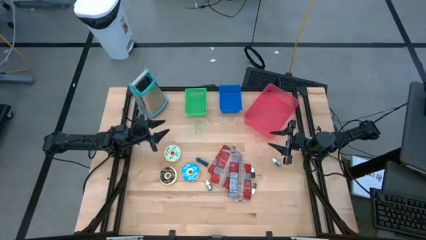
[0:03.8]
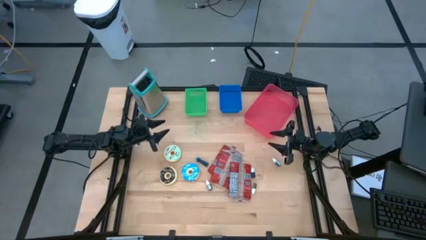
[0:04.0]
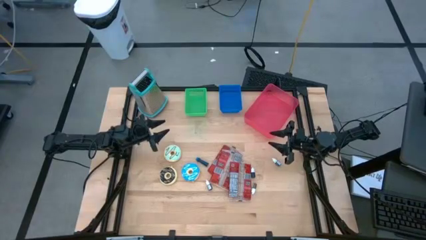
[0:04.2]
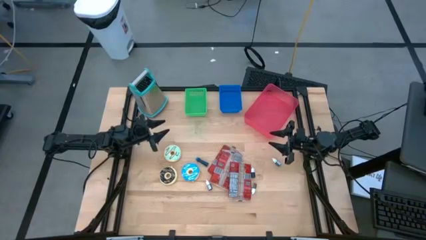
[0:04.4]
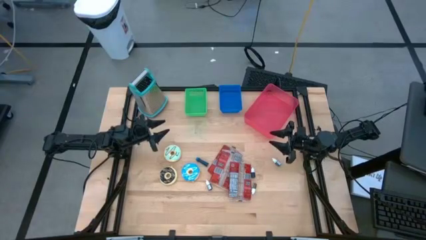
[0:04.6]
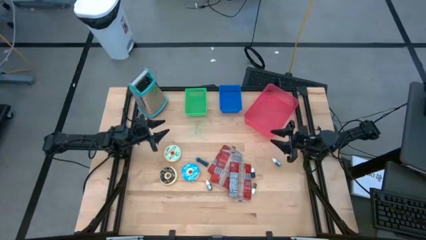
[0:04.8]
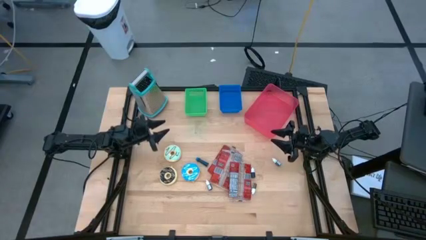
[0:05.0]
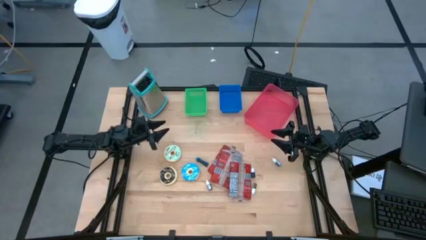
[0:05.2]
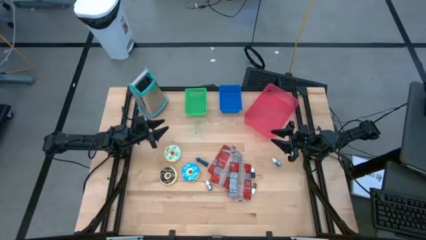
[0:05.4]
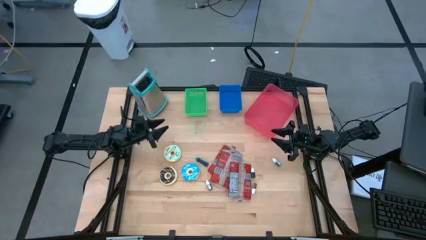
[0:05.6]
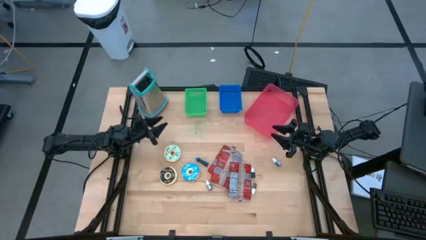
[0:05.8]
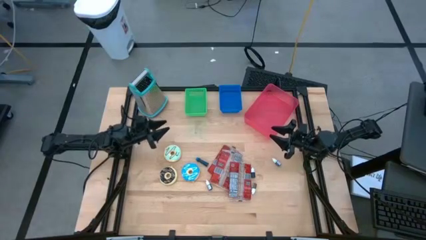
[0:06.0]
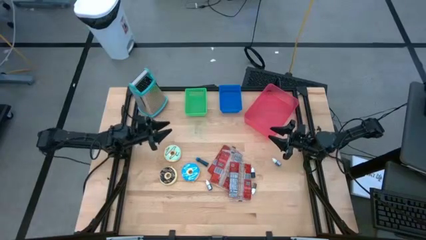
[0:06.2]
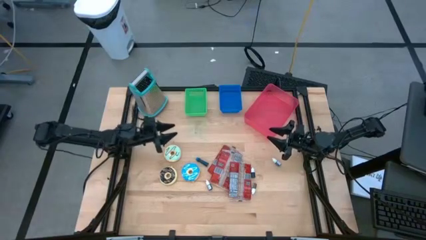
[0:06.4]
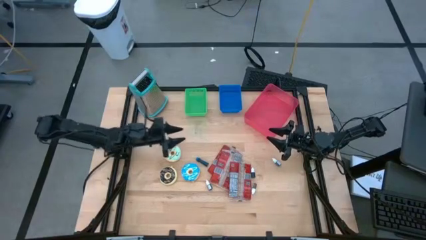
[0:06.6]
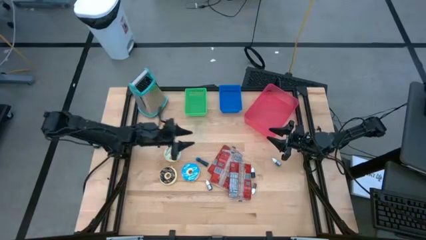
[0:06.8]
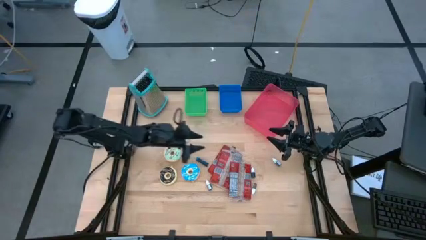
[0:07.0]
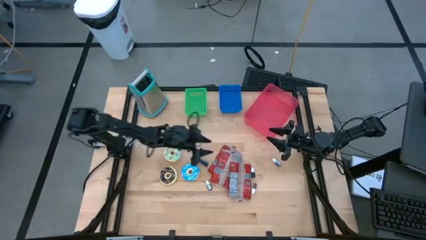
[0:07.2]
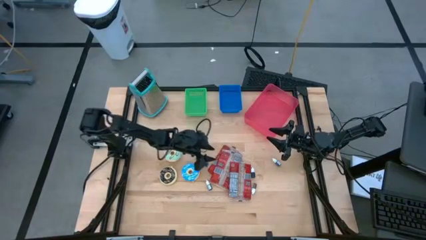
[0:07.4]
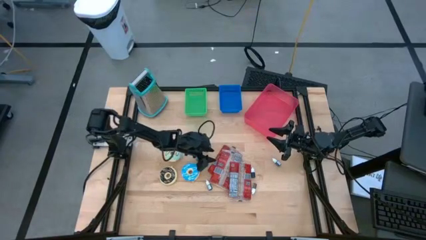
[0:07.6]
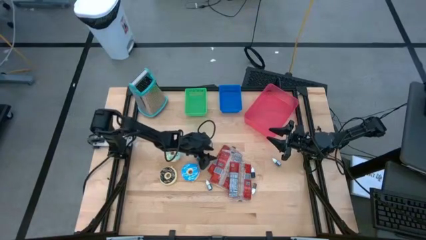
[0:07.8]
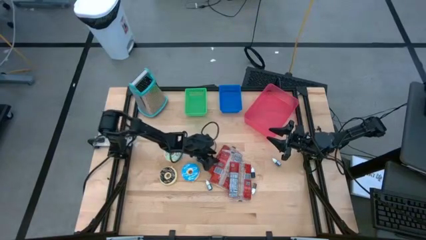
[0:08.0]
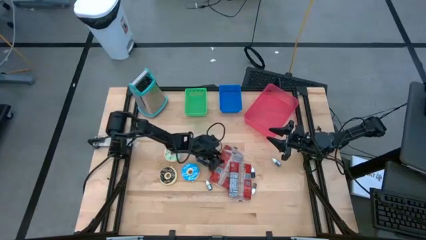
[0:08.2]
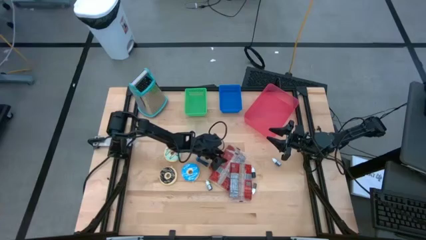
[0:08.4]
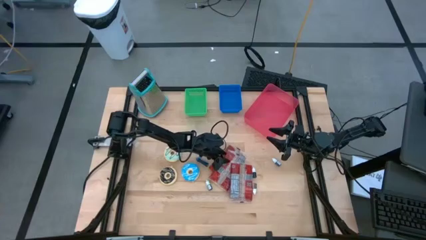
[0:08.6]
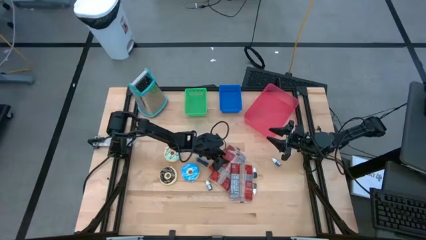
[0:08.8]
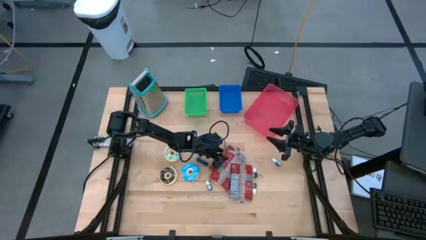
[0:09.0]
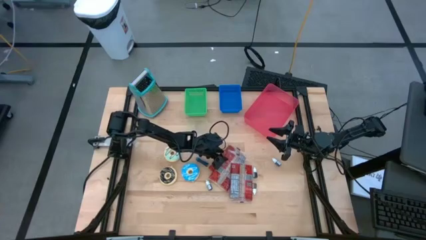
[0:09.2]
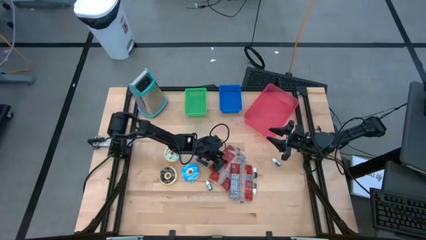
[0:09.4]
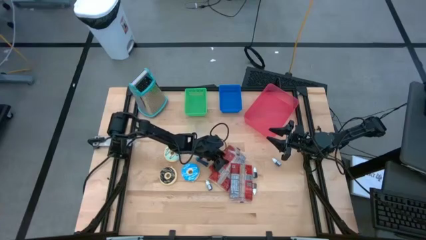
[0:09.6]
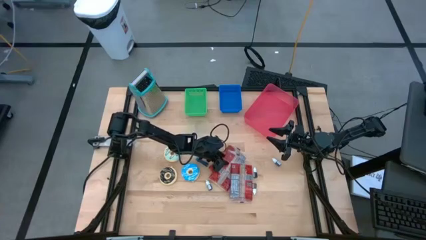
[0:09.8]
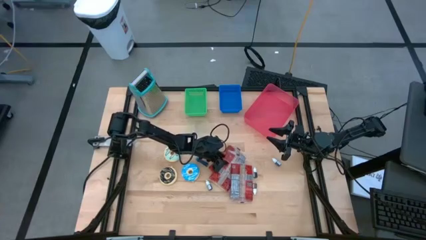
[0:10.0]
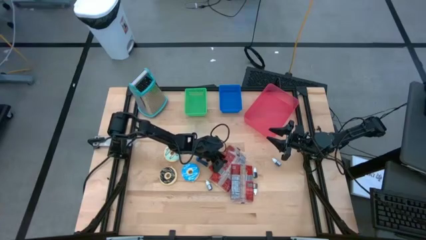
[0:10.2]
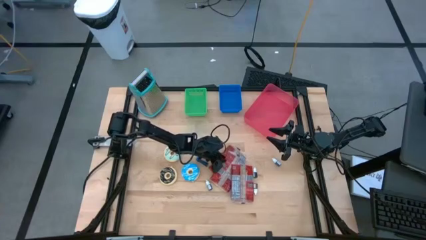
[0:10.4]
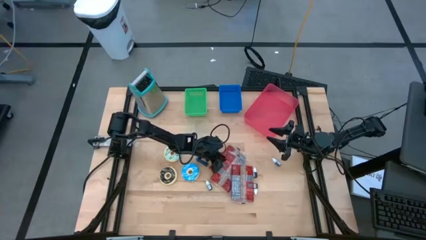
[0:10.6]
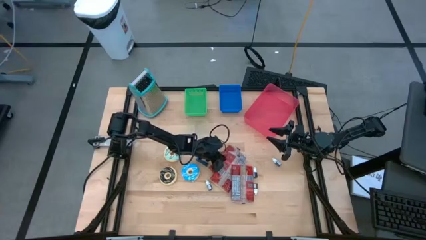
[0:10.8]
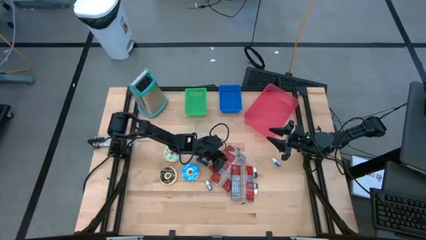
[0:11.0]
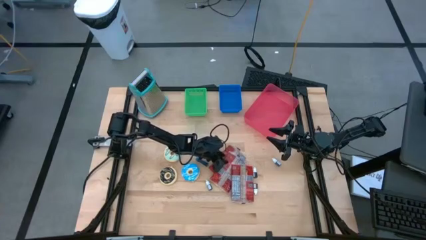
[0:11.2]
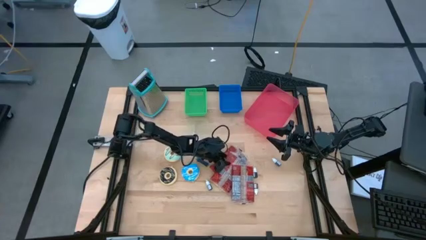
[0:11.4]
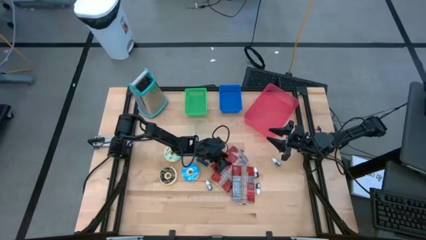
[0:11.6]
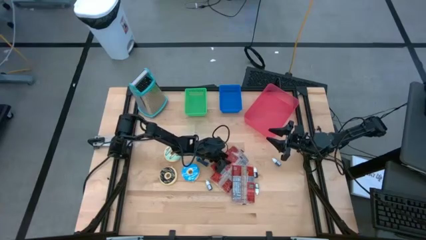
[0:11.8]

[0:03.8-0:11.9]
Put the middle red popcorn bag into the pink bin
